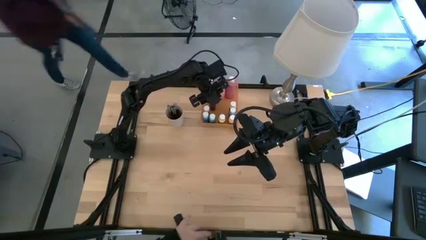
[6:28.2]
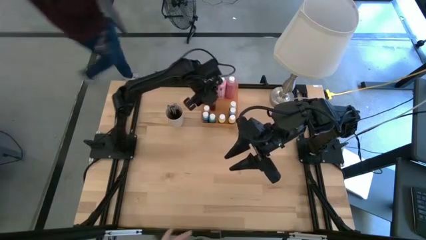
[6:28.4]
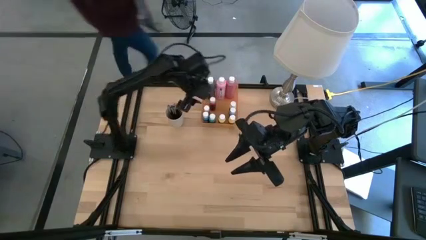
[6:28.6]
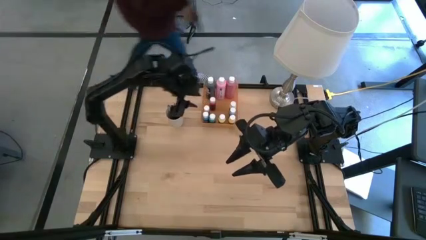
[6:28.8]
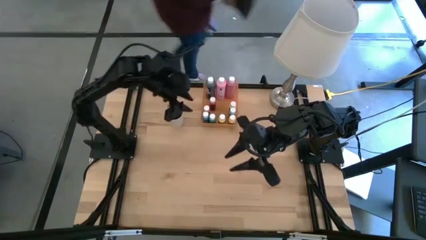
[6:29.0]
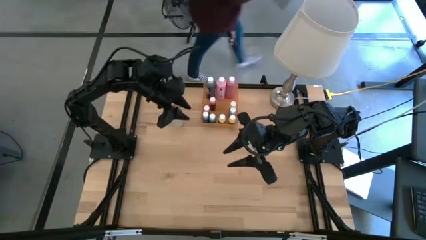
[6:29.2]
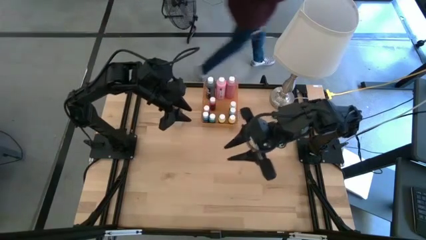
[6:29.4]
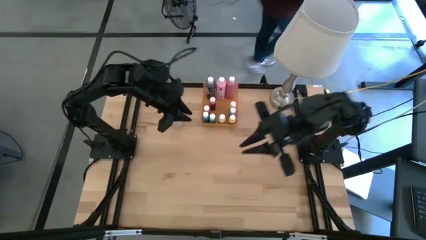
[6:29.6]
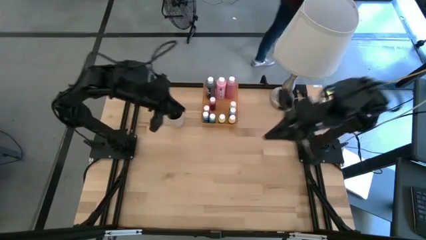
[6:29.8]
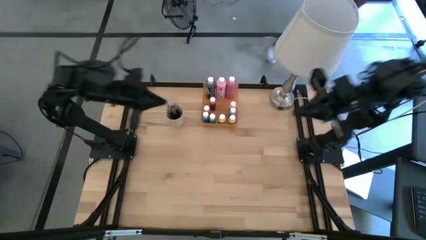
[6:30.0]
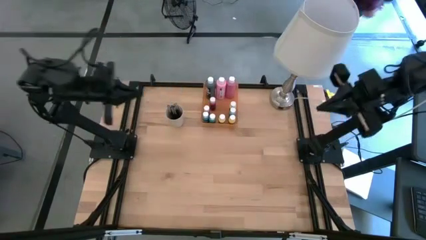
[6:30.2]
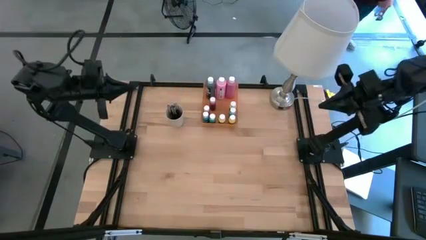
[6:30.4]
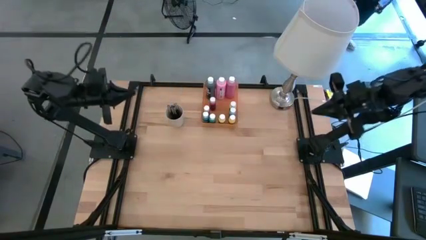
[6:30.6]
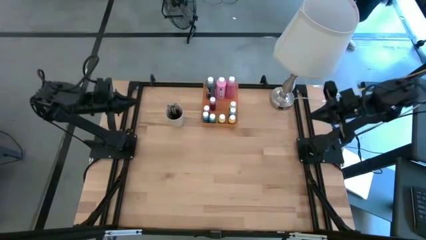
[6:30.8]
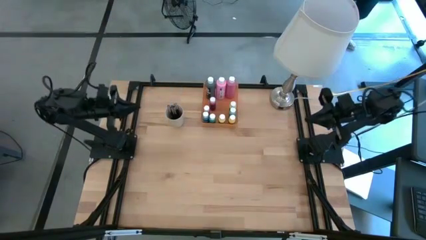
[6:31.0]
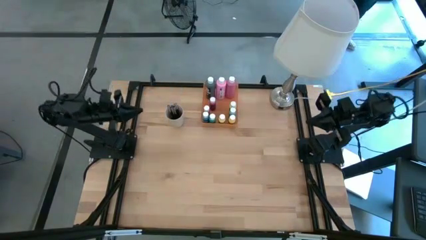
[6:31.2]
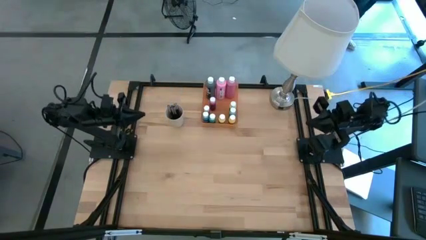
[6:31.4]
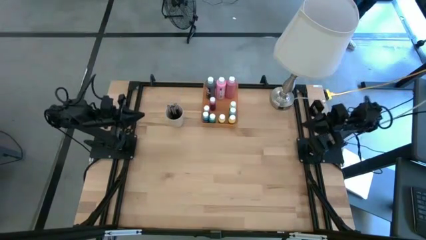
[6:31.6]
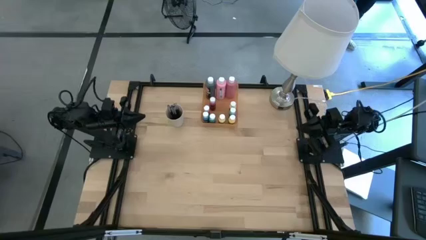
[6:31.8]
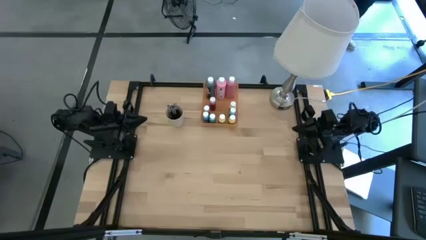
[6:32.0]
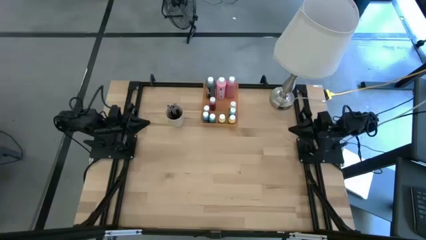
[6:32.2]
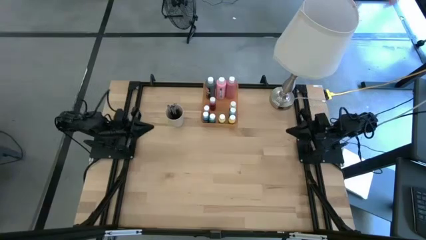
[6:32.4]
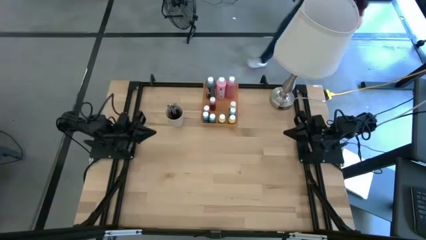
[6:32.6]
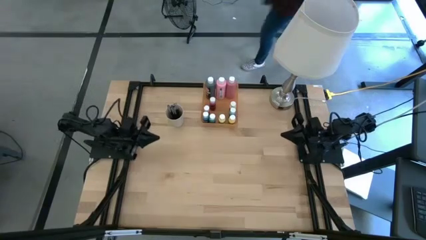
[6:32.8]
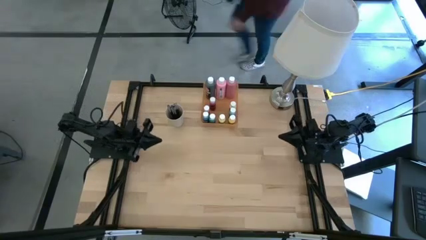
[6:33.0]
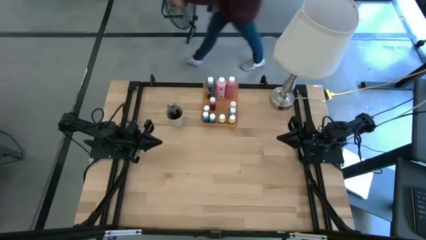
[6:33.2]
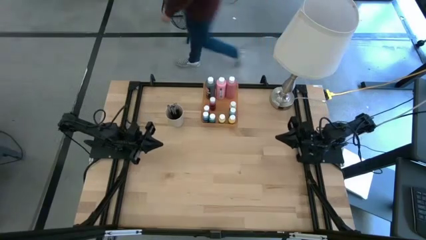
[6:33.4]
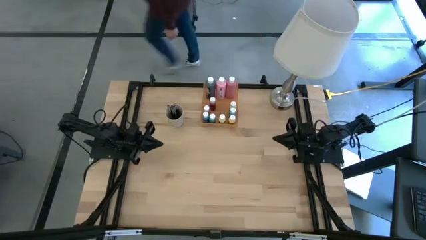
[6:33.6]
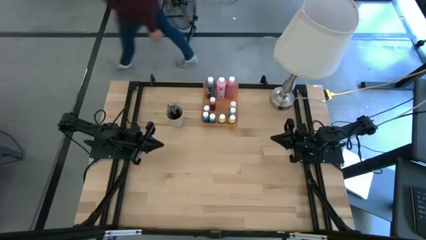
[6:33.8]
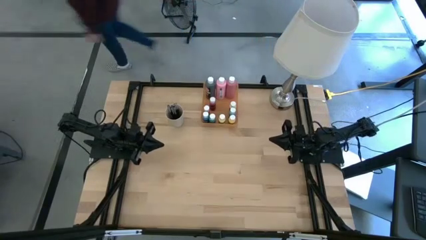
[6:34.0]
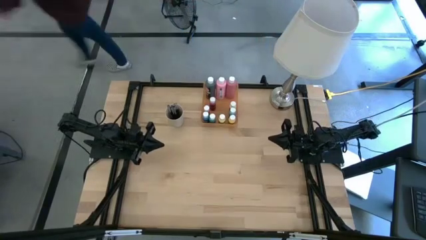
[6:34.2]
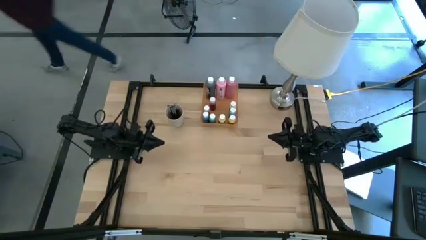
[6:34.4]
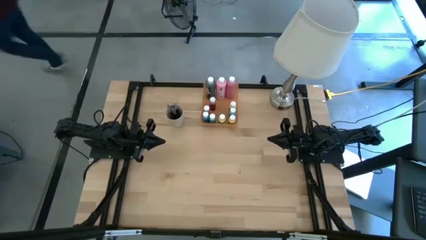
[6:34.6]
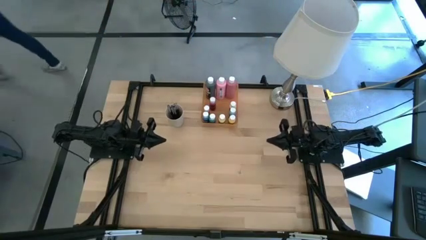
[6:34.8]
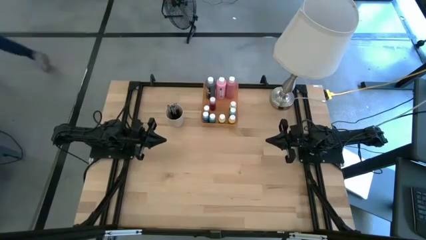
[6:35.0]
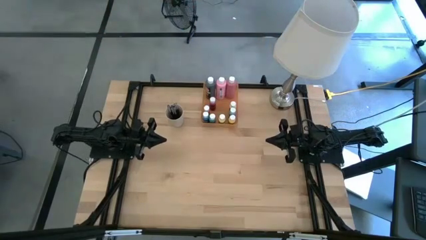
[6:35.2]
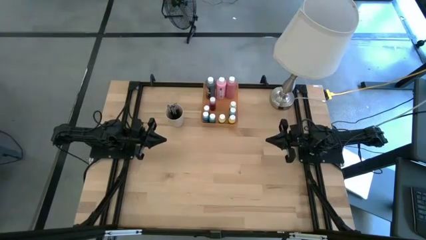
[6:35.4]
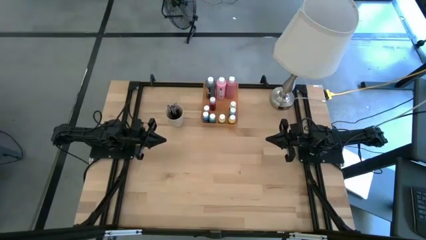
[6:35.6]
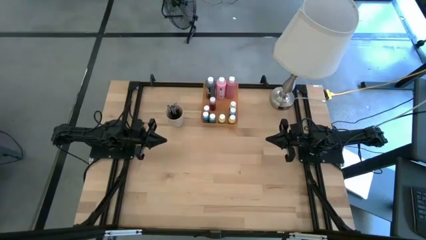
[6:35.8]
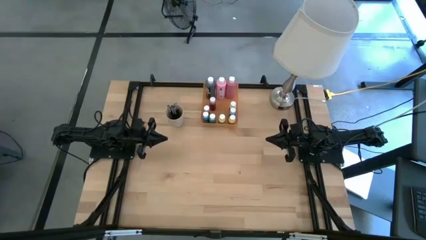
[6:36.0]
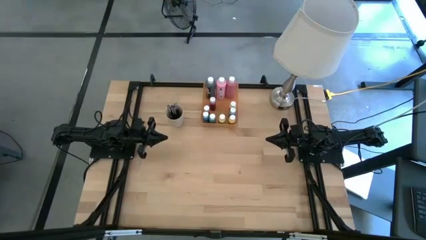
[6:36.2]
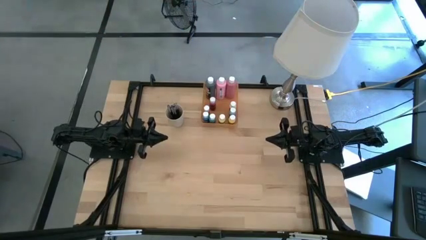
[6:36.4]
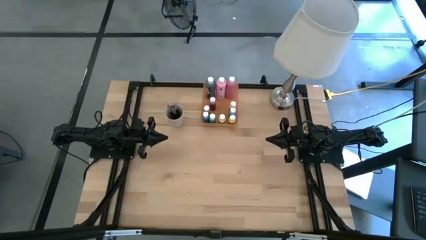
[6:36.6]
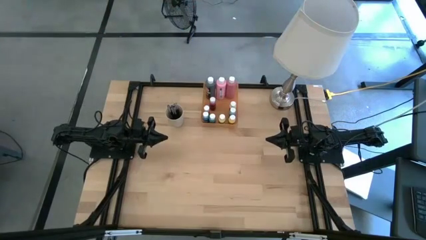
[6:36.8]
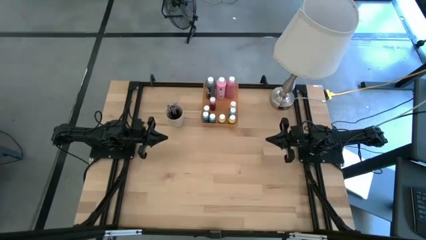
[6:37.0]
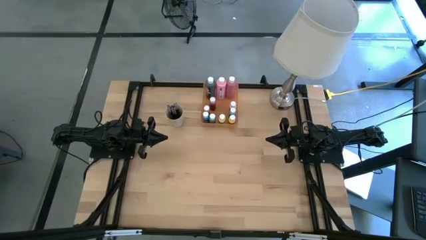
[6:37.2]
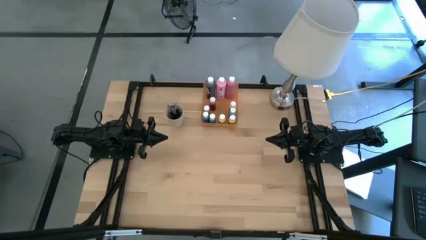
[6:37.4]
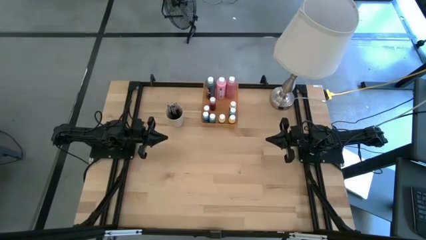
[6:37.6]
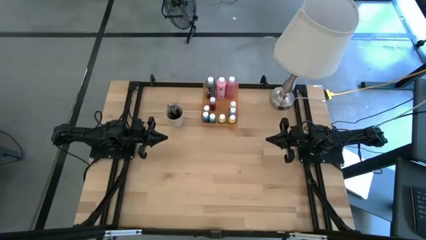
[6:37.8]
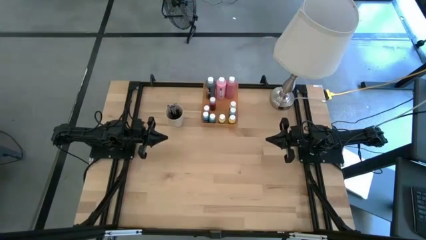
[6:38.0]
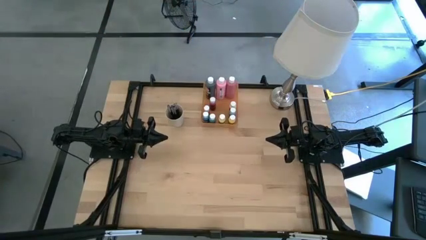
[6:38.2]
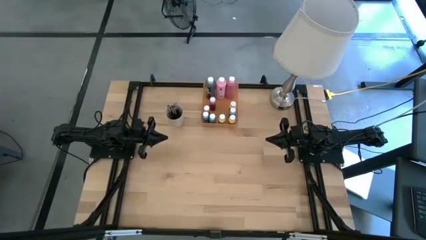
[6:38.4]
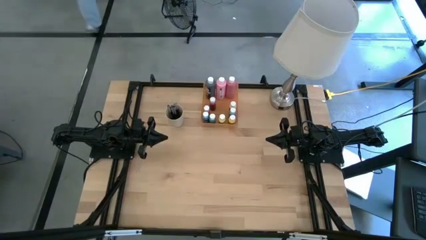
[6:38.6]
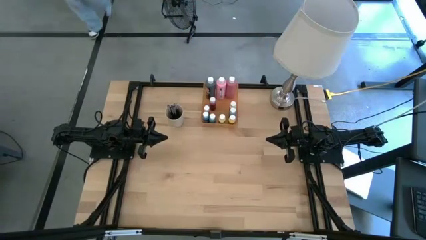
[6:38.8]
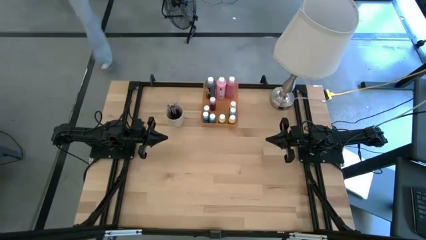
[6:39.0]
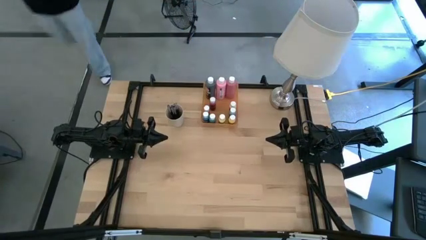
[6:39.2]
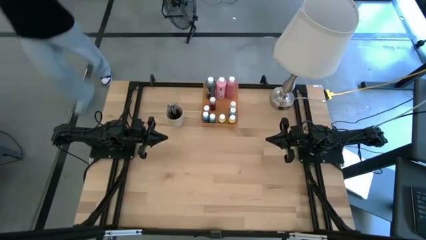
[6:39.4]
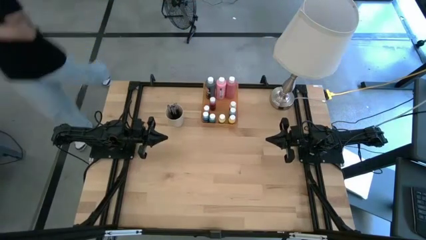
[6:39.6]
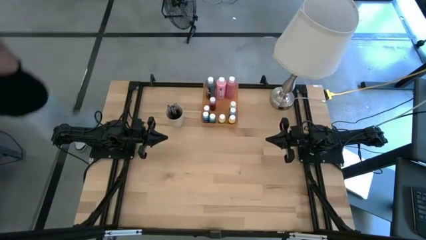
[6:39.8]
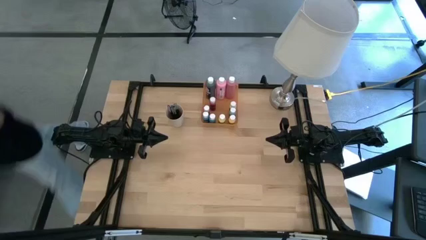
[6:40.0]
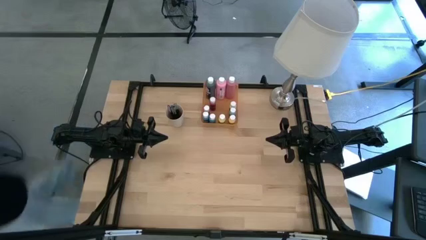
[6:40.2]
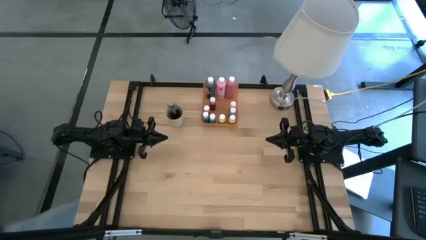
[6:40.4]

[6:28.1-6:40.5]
Task: Pick & Place Paint Supplies
Return to Home Position

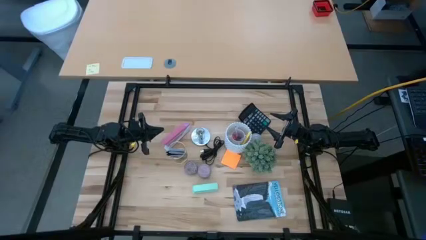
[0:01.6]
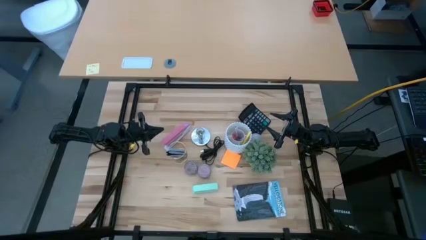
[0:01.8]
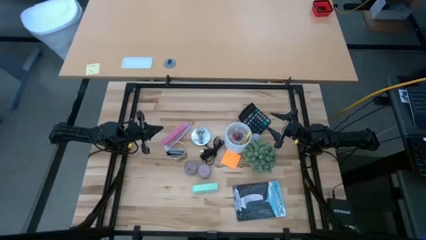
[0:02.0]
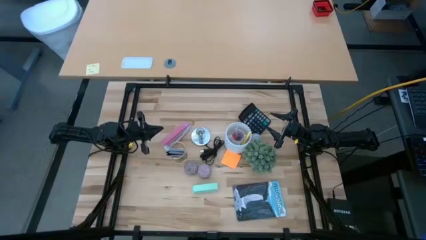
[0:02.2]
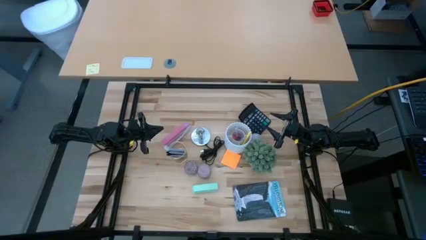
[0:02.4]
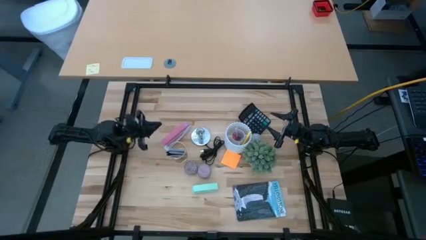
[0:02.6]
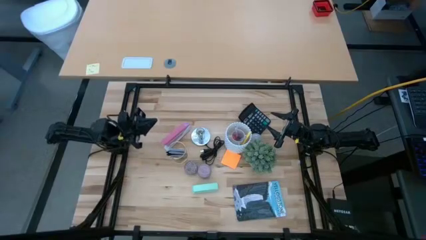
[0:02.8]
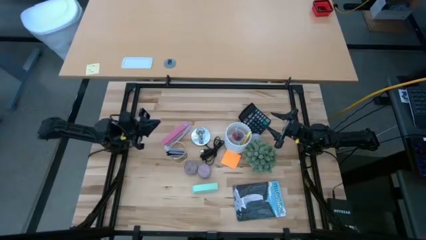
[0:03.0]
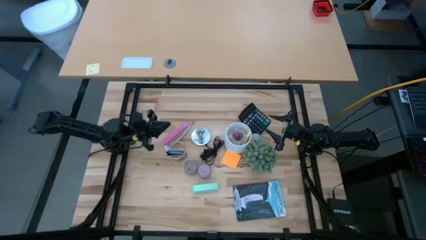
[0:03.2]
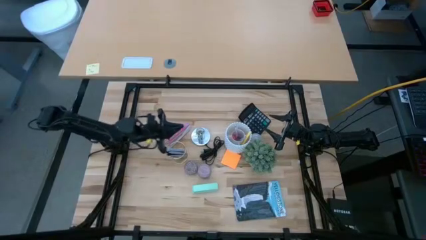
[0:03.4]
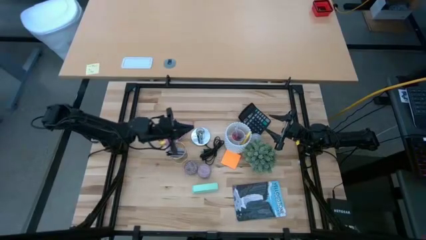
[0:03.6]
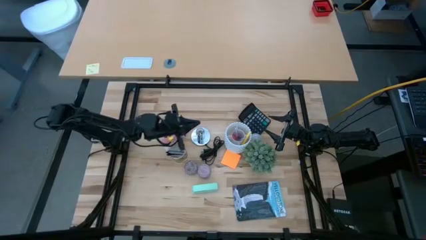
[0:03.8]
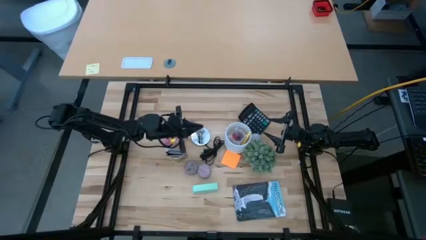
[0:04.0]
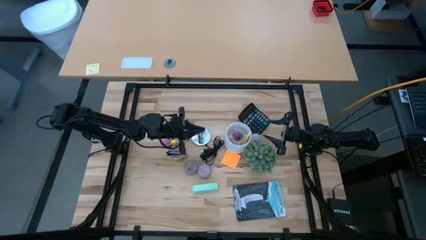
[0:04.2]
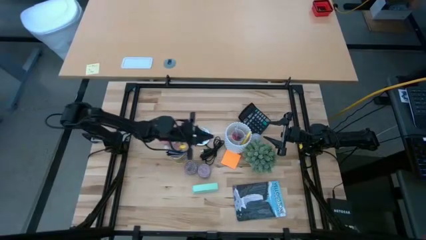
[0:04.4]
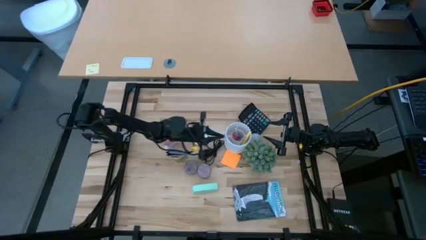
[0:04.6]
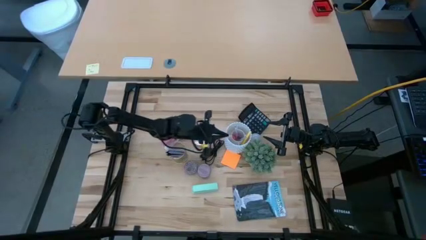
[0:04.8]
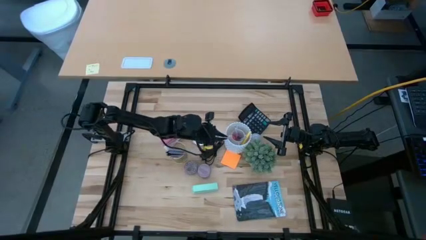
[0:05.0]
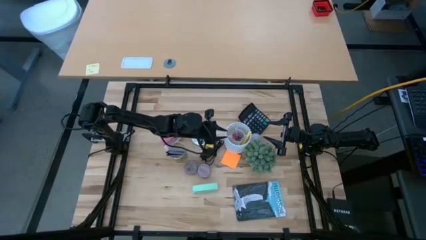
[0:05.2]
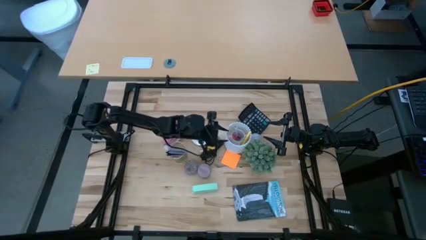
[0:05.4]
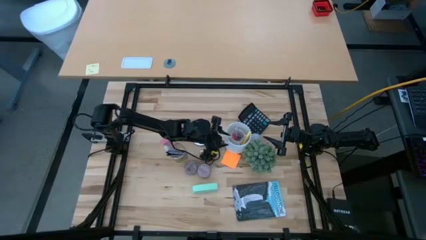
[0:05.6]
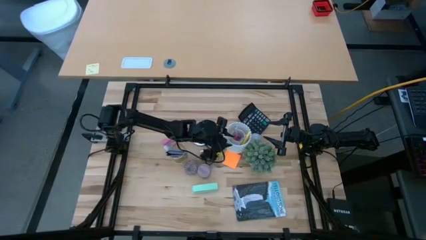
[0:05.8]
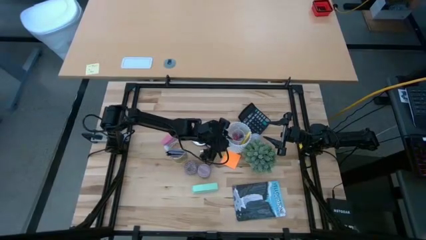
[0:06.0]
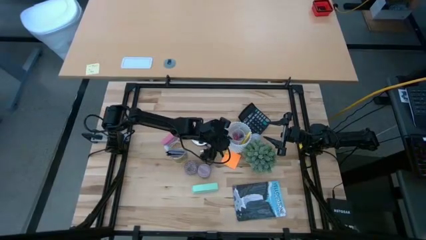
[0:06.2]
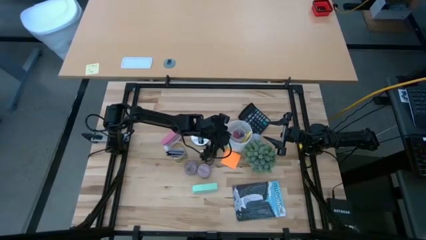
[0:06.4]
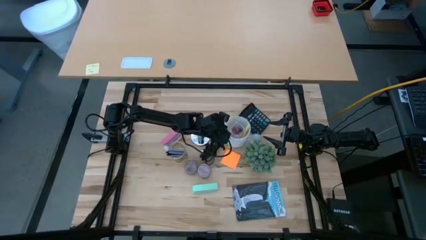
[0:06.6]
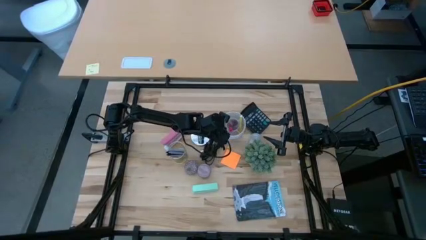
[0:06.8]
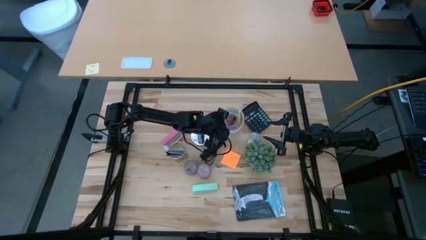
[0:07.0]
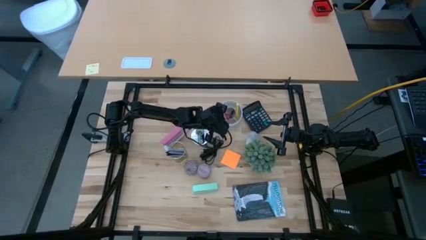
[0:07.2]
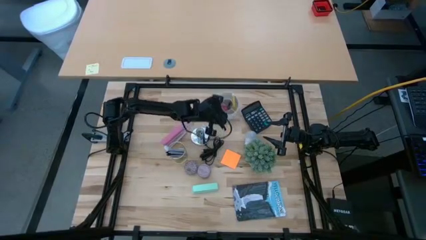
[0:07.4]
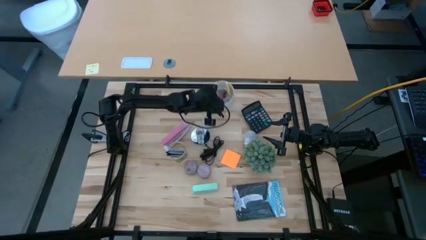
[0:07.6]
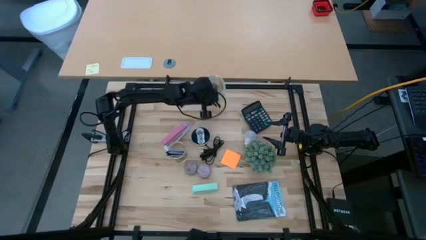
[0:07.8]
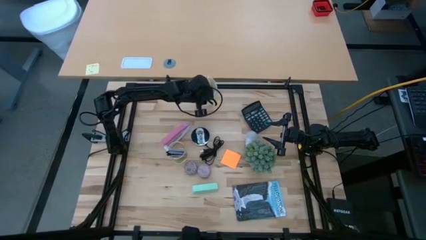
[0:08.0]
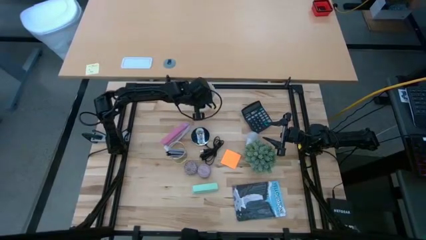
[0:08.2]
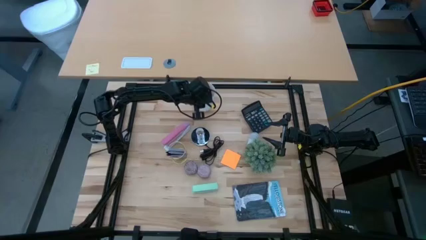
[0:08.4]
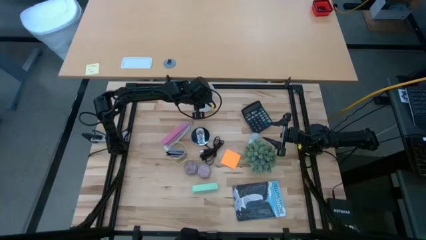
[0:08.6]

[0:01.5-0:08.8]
Task: Screw lightbulb
Move the white pen rack to the upper middle of the table
